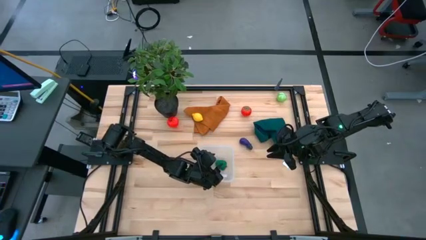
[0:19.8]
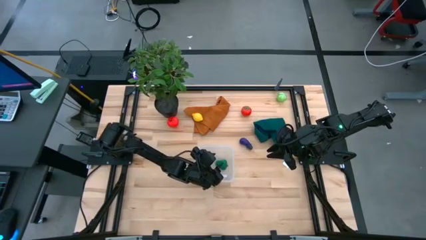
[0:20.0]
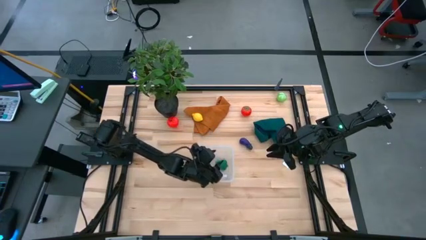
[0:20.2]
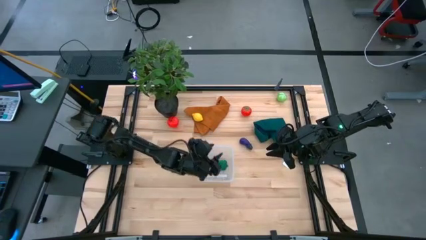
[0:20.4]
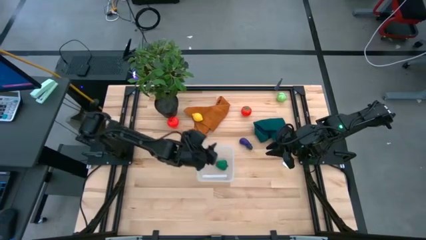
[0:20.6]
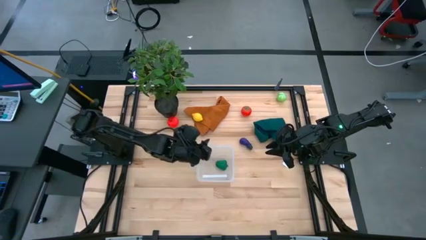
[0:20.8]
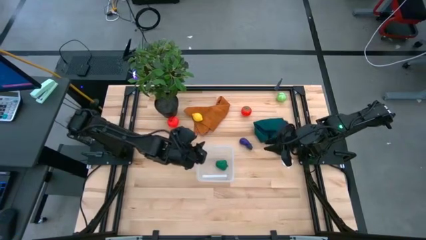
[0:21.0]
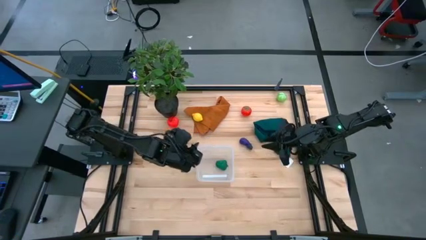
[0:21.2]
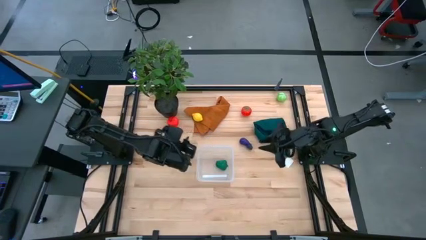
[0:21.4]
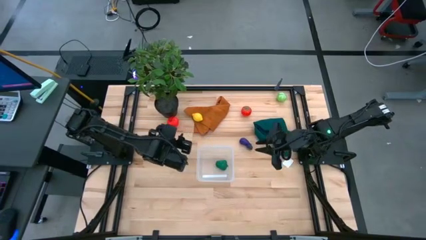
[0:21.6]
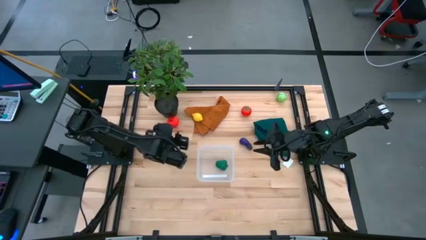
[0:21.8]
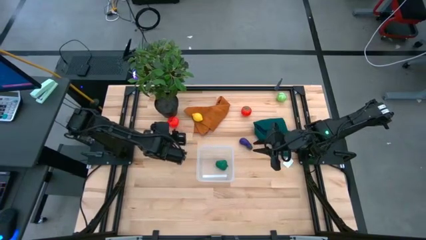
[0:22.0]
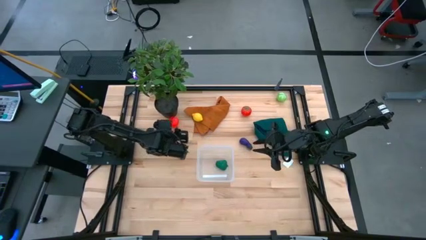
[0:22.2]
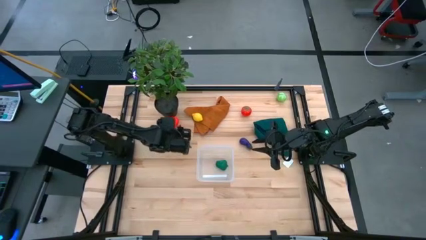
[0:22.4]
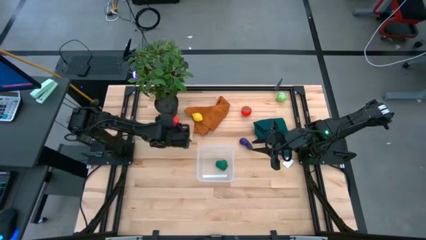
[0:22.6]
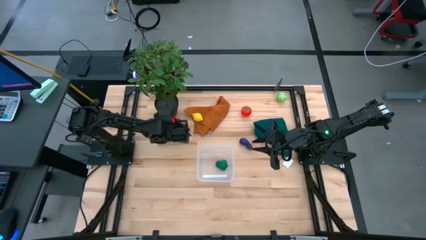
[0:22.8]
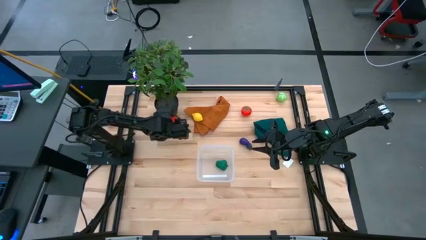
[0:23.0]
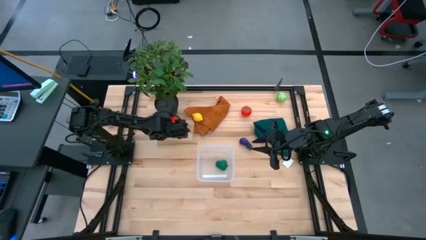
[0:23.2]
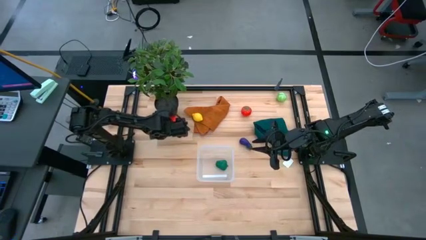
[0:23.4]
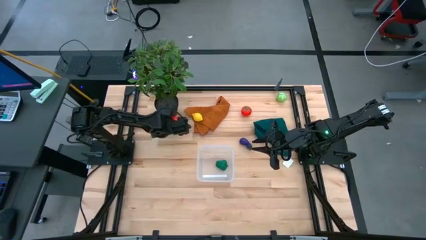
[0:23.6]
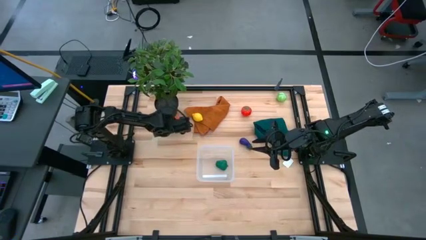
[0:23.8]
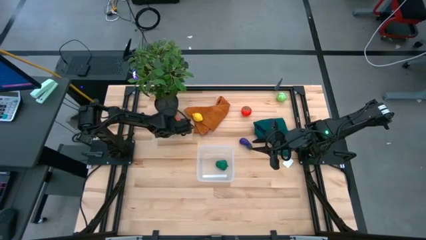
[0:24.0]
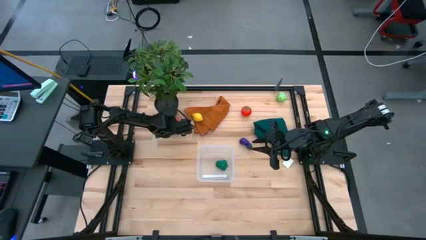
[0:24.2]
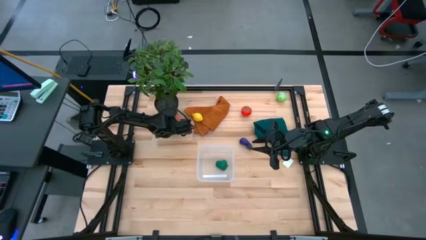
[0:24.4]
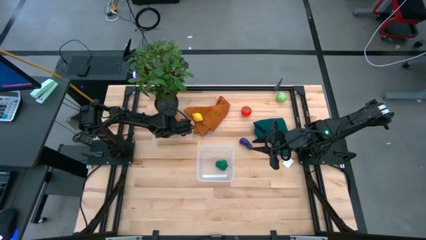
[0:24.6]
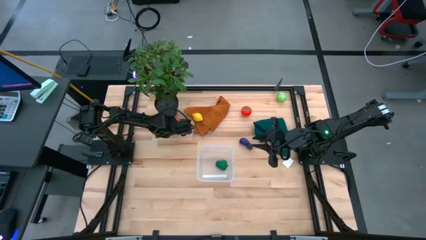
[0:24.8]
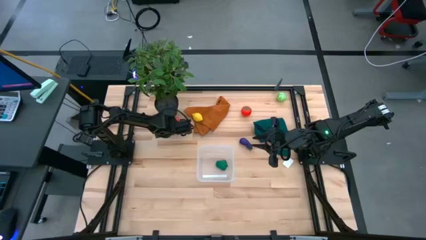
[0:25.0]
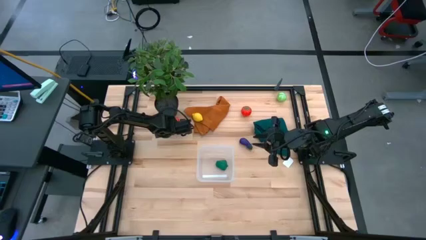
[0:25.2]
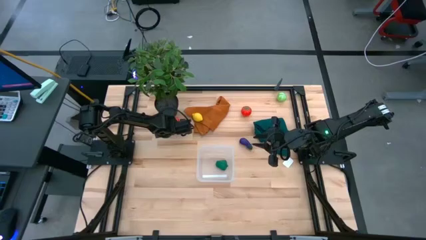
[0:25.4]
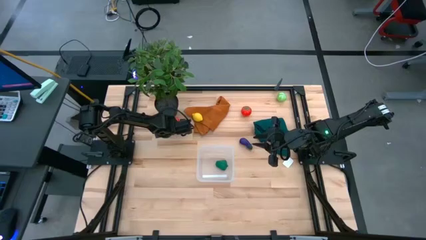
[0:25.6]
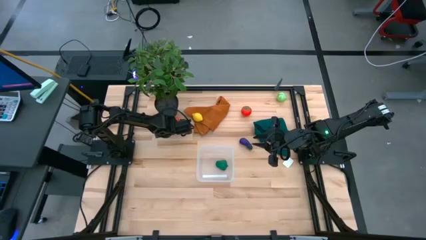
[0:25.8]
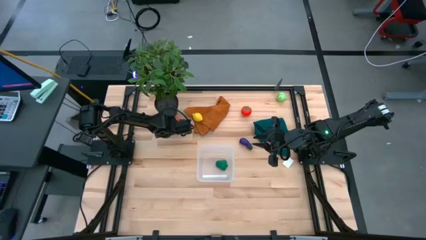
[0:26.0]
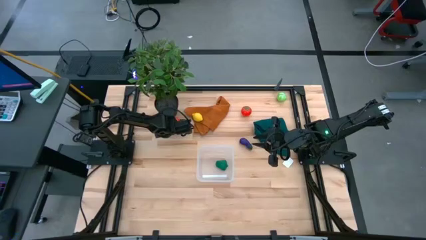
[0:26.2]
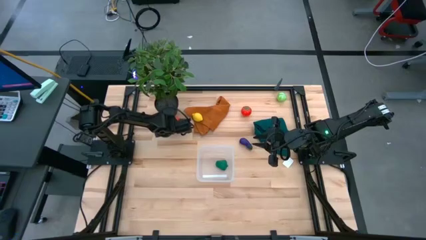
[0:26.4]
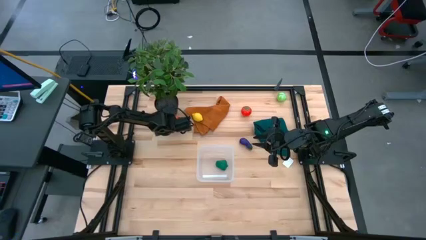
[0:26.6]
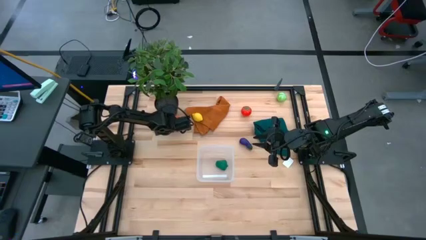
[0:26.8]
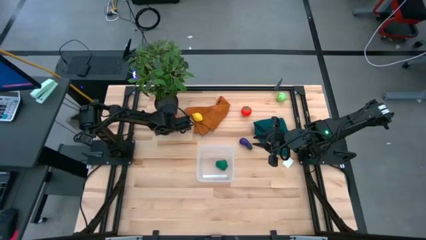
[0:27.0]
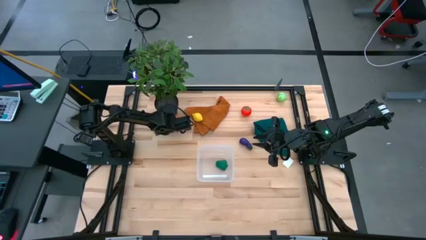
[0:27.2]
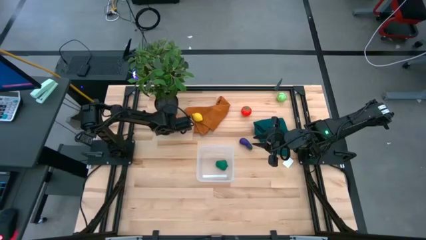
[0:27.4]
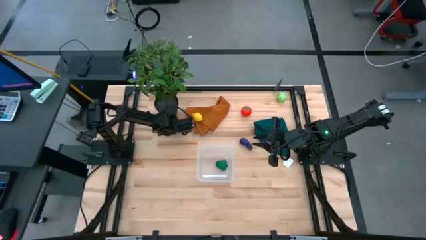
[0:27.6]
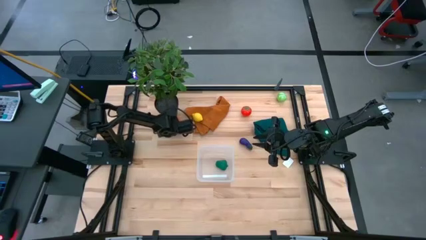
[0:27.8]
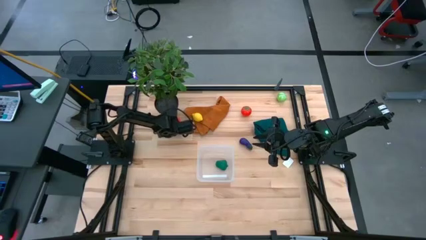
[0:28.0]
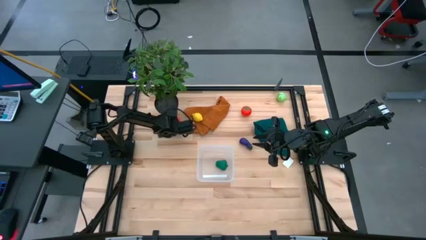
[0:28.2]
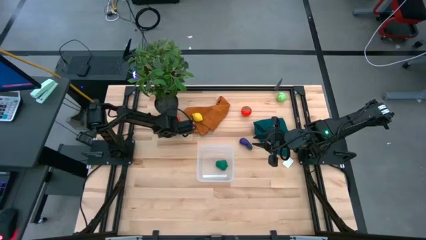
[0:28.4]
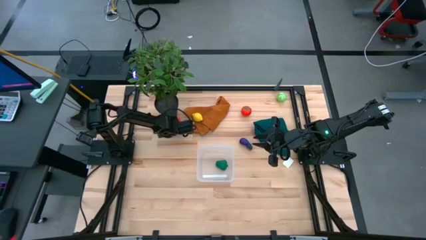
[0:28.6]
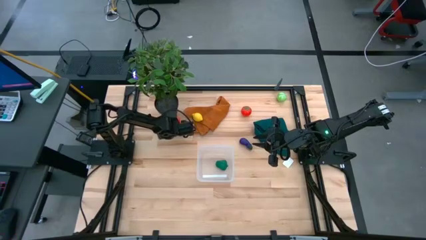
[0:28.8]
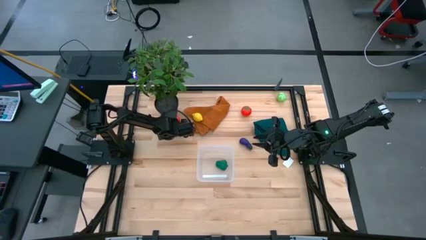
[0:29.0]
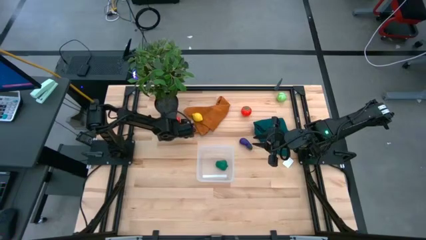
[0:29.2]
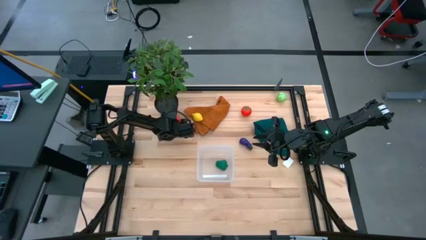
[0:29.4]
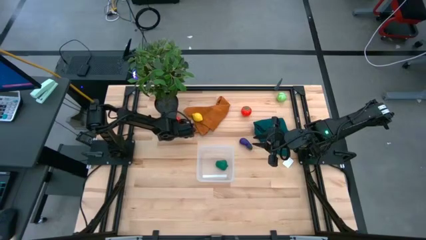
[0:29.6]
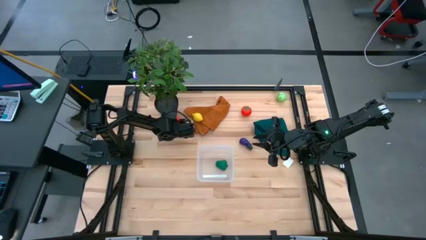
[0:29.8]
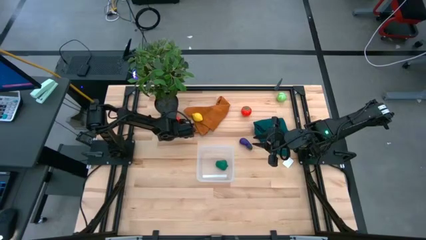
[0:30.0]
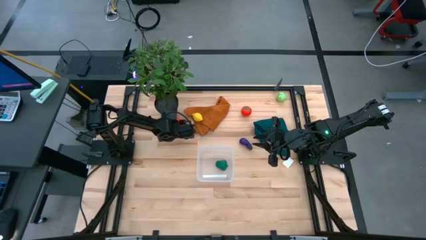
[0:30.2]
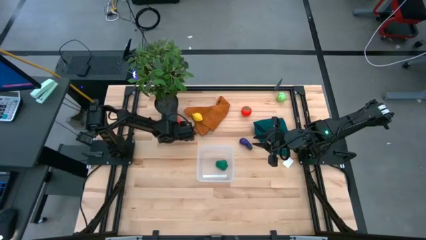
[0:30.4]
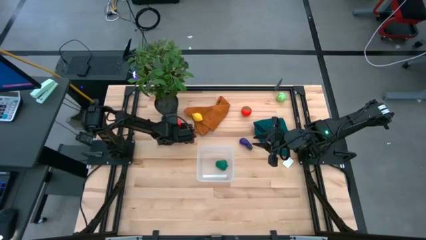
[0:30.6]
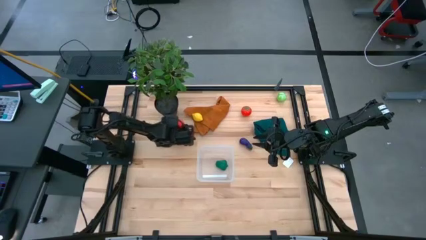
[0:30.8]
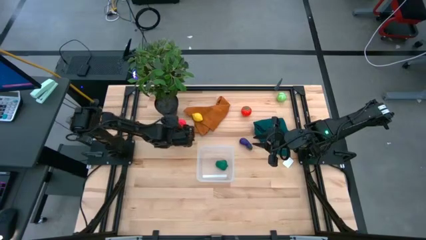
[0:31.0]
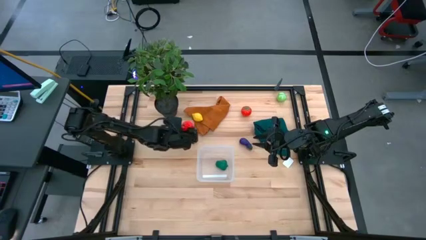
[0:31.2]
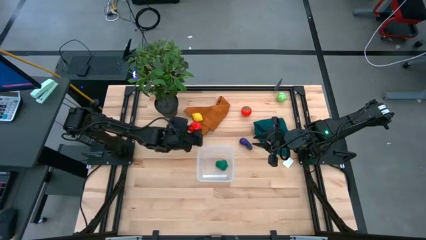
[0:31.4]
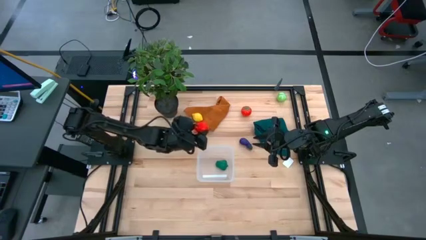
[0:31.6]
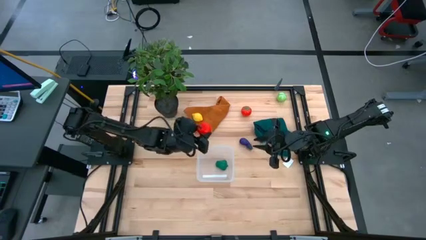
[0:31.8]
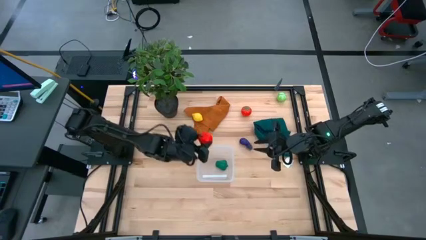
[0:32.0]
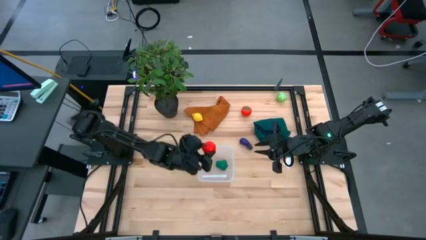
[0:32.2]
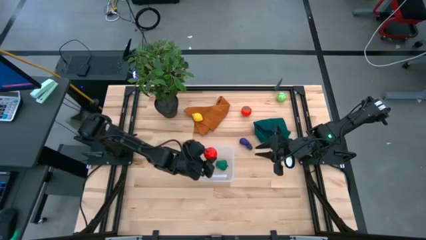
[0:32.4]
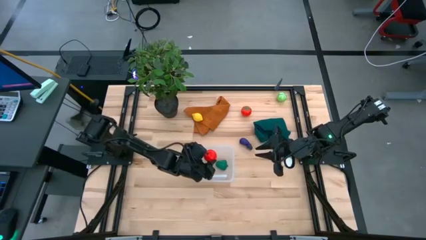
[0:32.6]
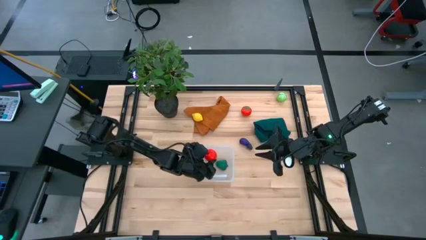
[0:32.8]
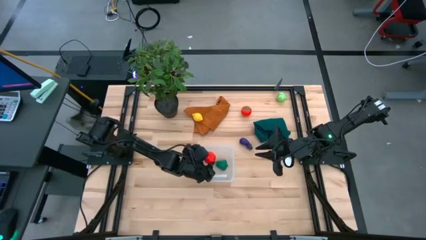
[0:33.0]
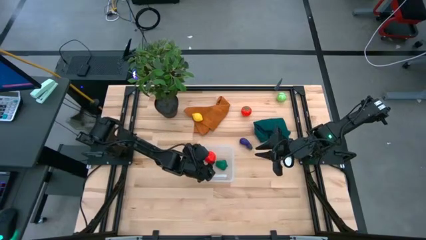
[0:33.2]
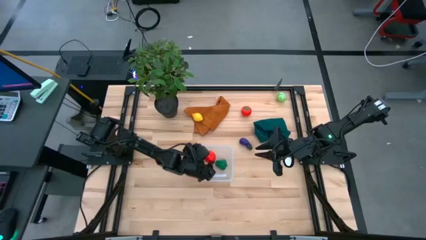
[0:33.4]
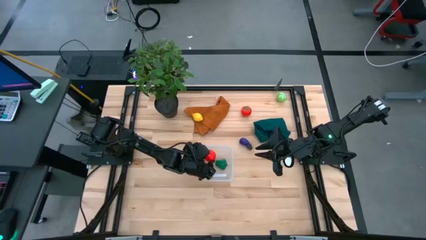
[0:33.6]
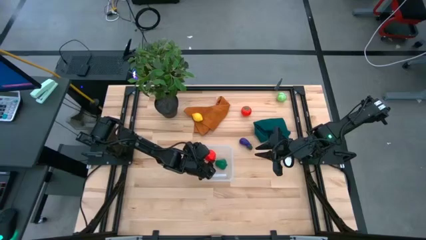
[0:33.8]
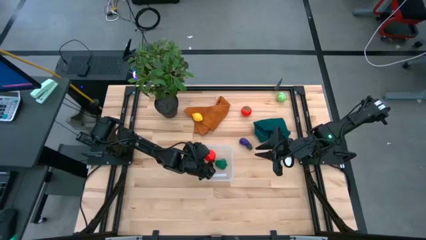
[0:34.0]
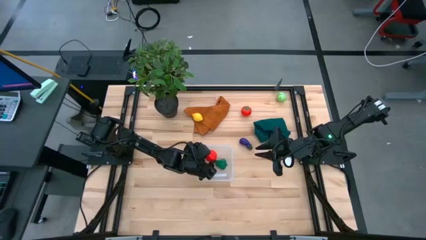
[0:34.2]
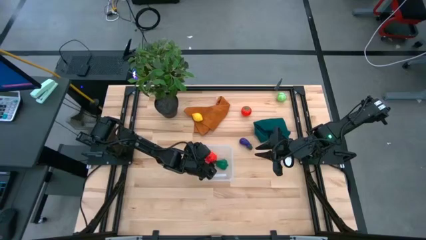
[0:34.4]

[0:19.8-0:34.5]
Task: Pick and placing Produce into tupperware
Put the red apple into the transparent bin
